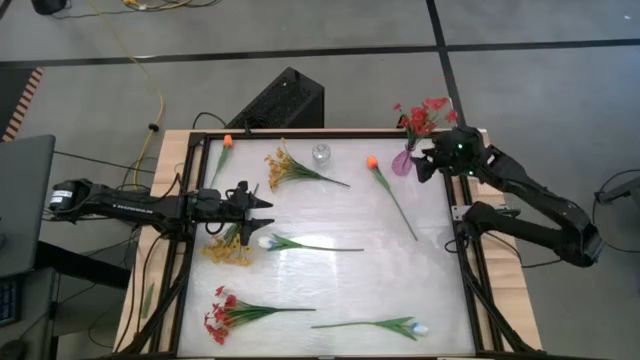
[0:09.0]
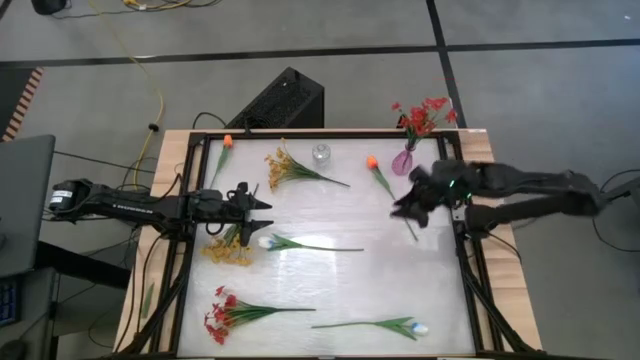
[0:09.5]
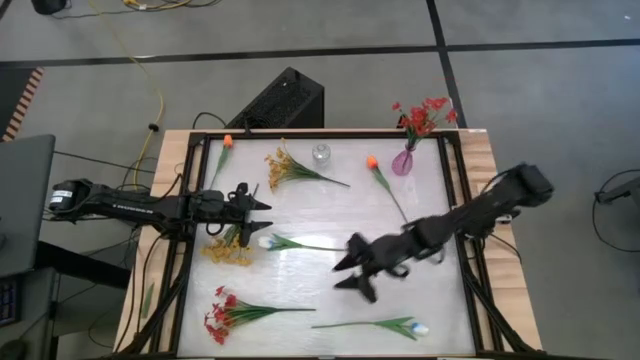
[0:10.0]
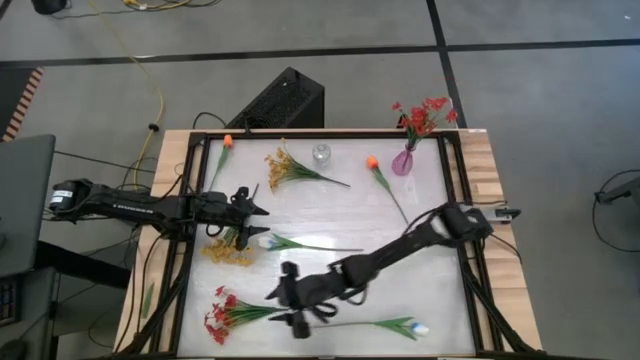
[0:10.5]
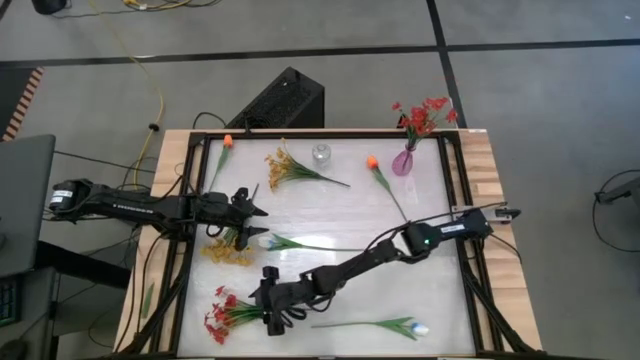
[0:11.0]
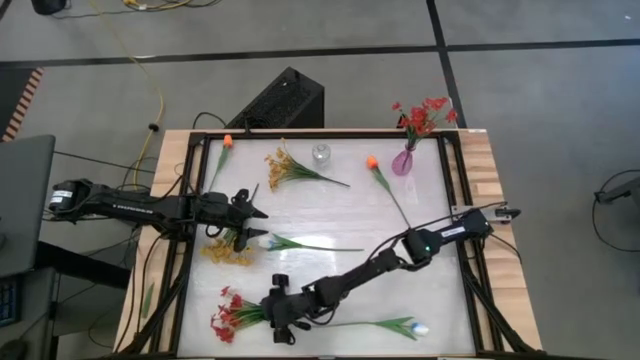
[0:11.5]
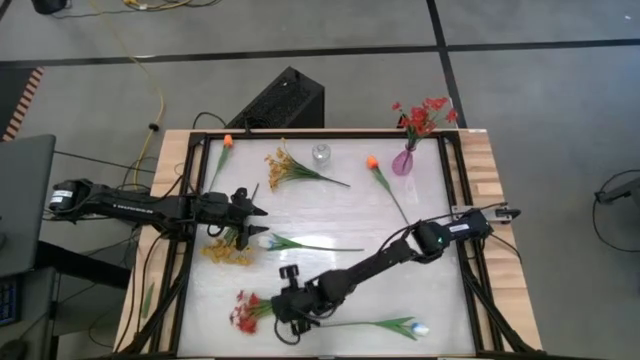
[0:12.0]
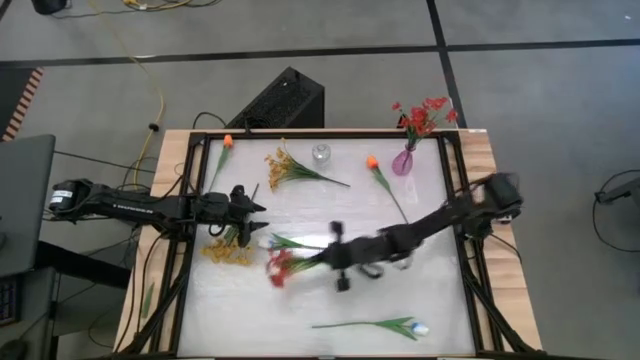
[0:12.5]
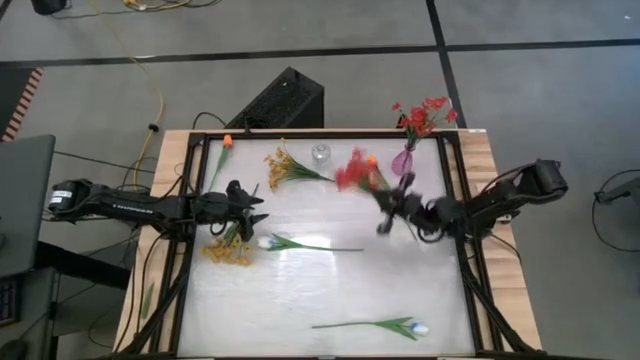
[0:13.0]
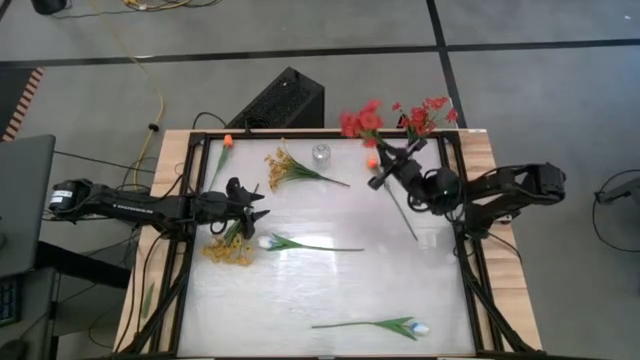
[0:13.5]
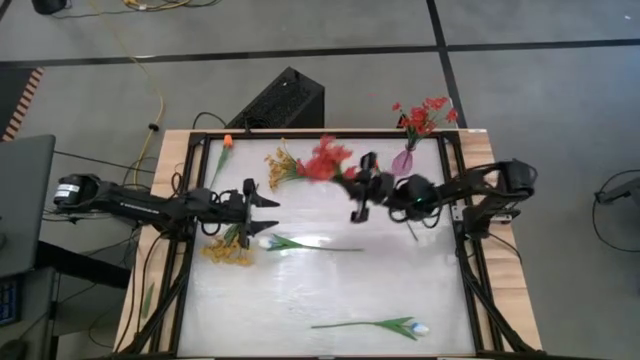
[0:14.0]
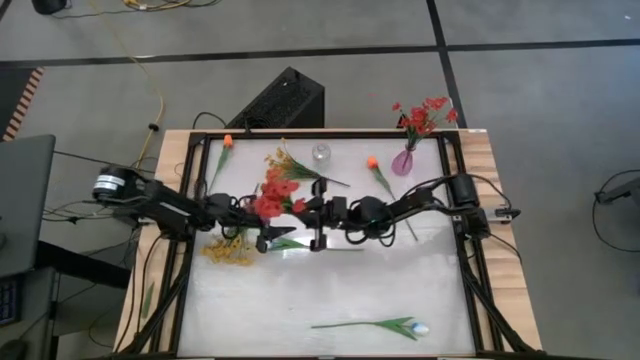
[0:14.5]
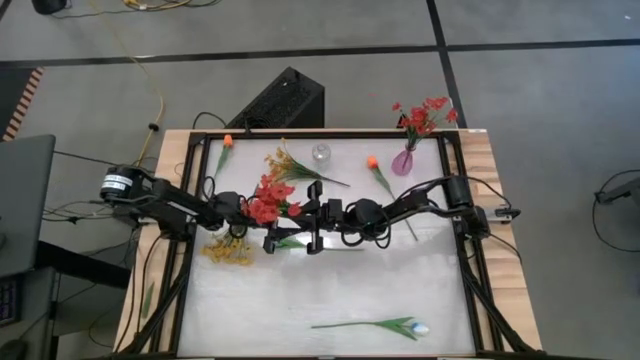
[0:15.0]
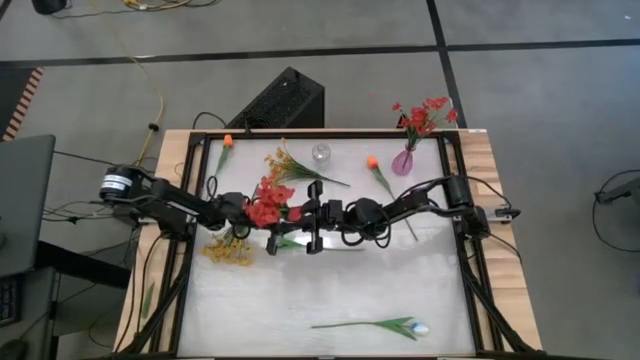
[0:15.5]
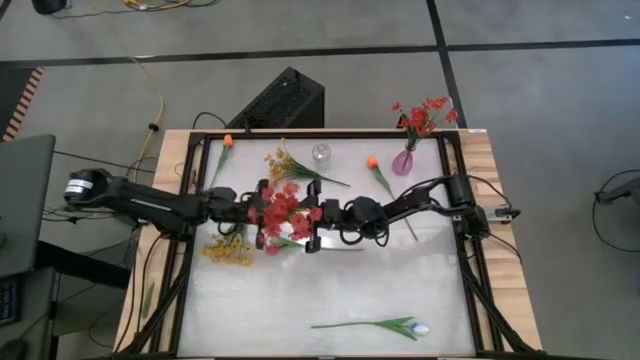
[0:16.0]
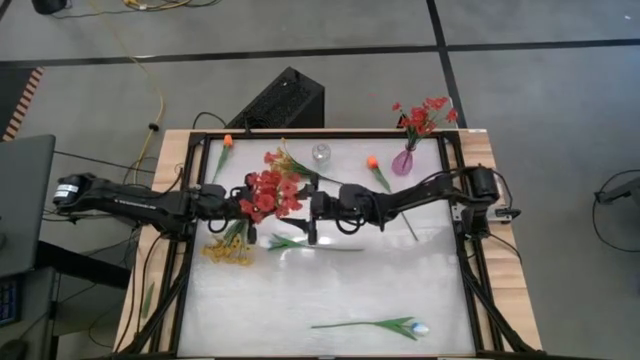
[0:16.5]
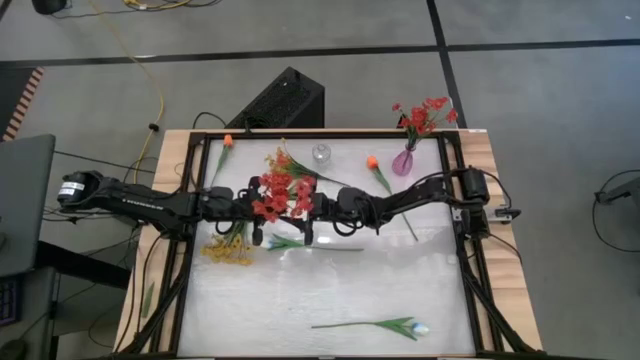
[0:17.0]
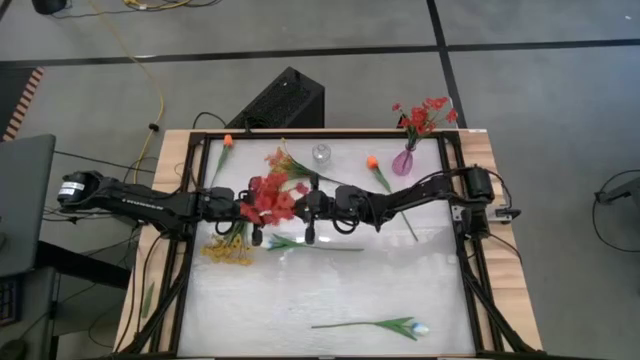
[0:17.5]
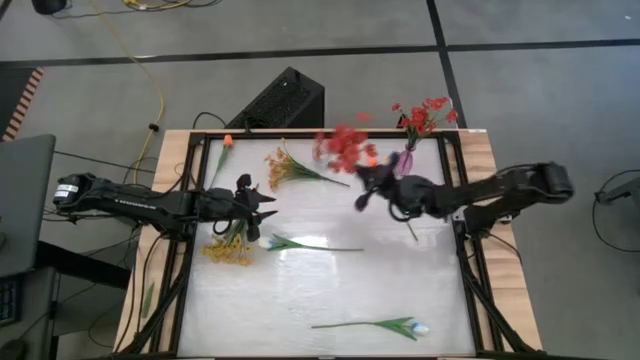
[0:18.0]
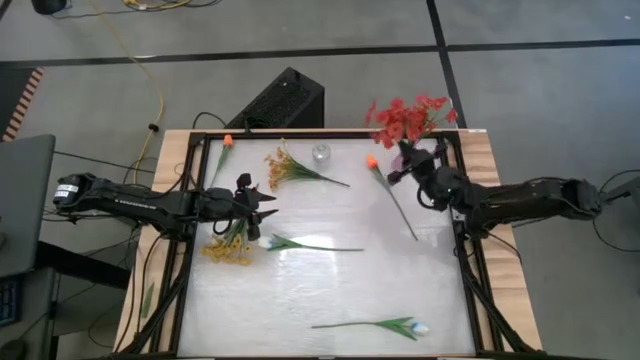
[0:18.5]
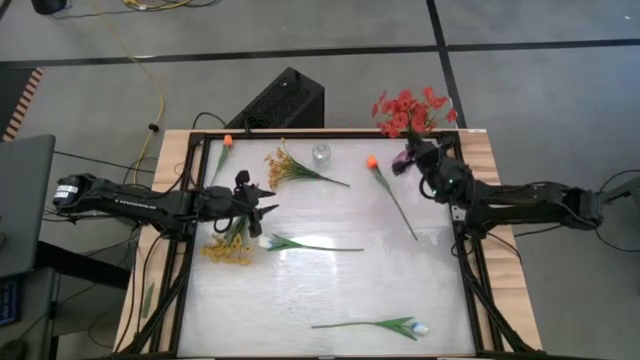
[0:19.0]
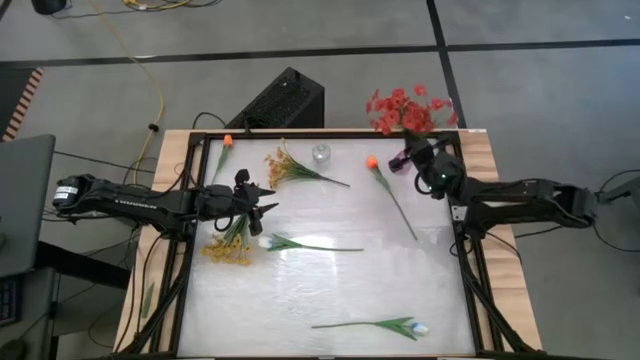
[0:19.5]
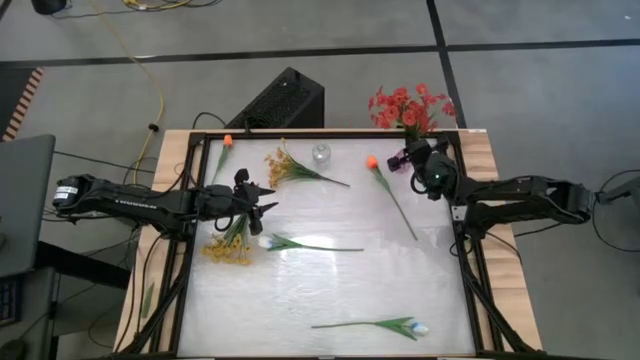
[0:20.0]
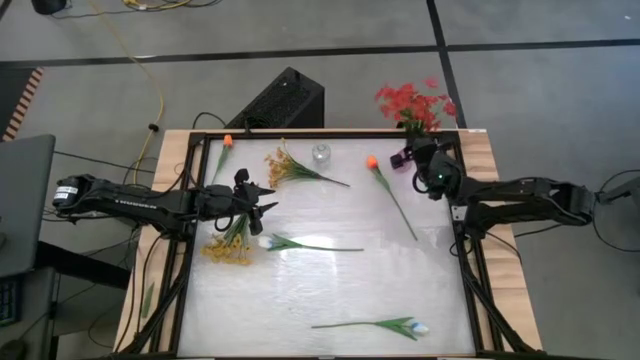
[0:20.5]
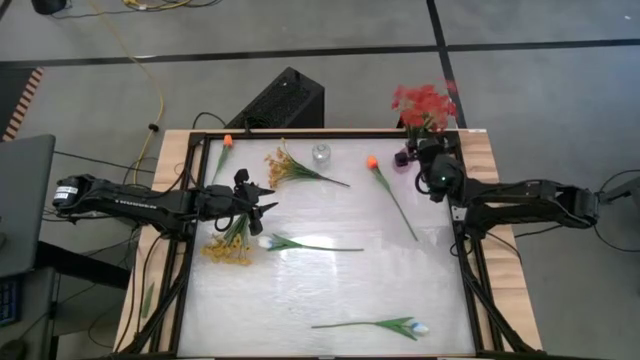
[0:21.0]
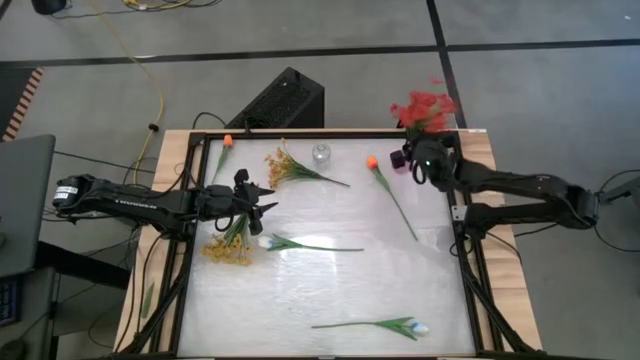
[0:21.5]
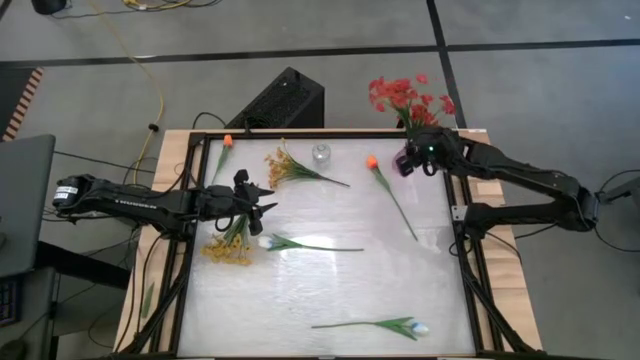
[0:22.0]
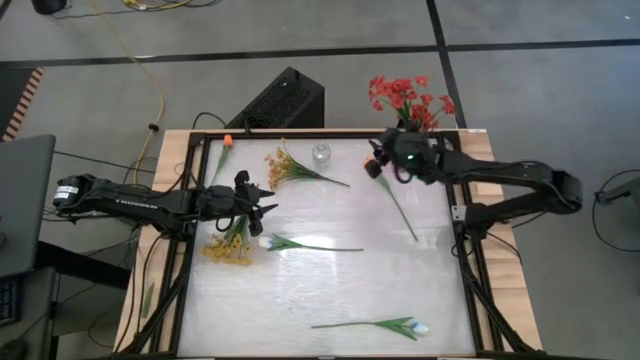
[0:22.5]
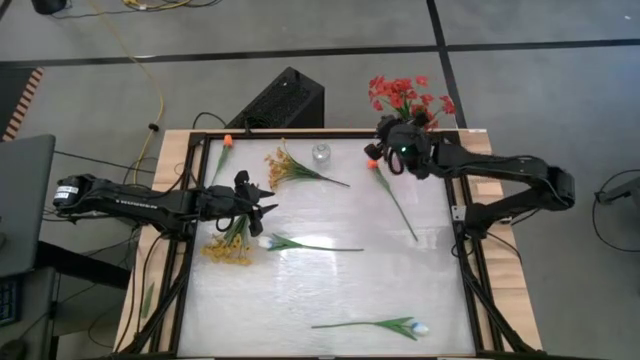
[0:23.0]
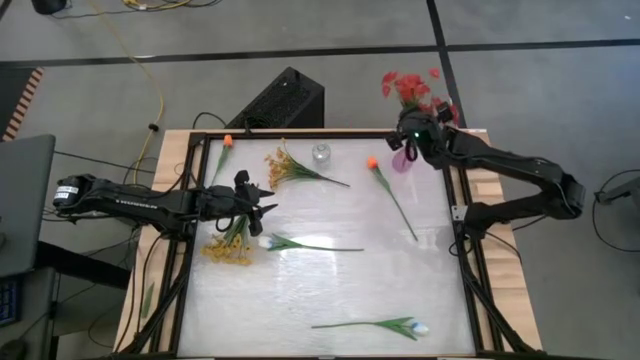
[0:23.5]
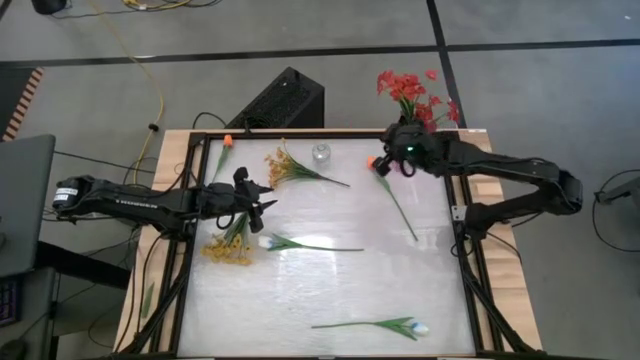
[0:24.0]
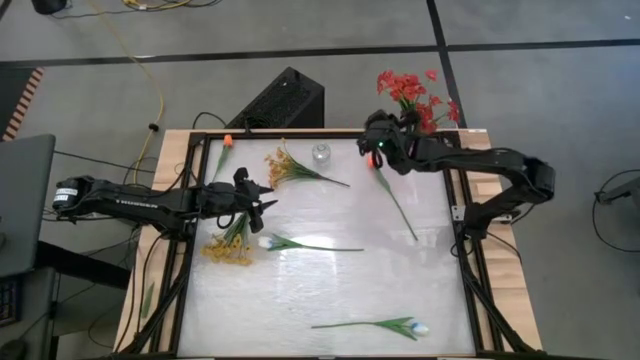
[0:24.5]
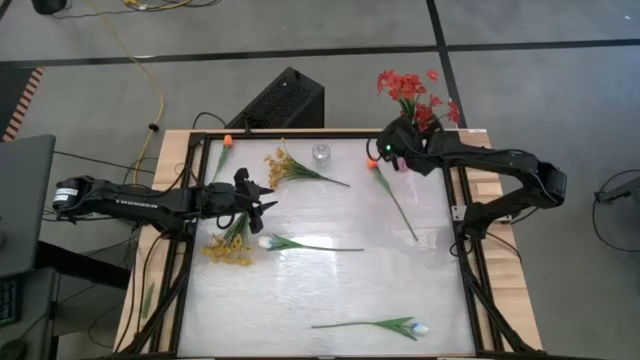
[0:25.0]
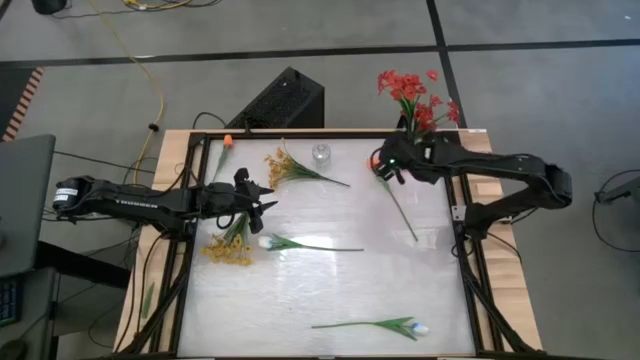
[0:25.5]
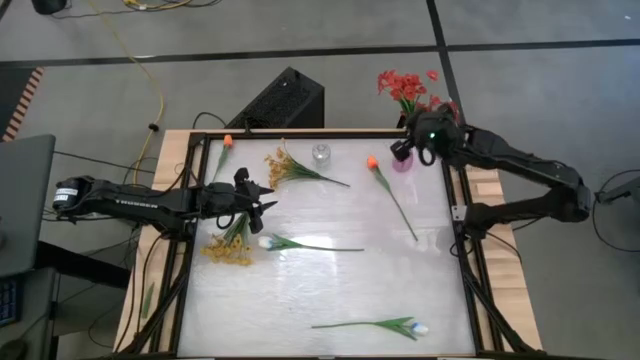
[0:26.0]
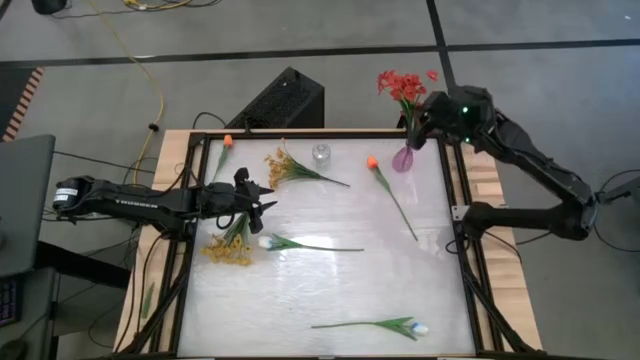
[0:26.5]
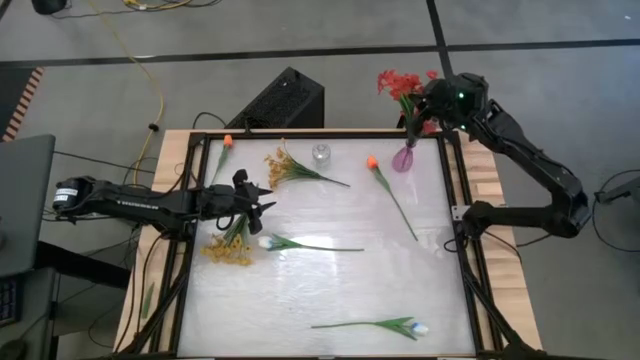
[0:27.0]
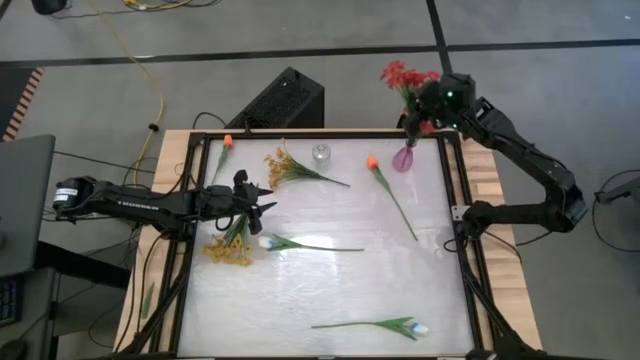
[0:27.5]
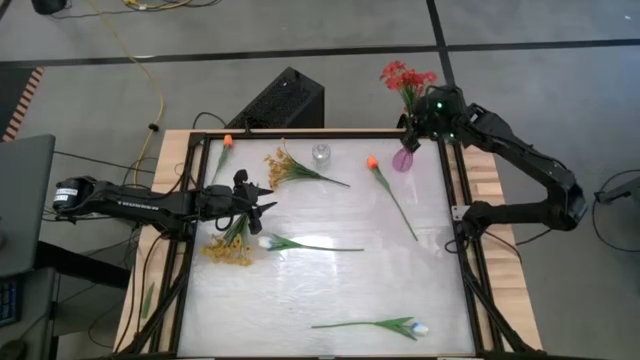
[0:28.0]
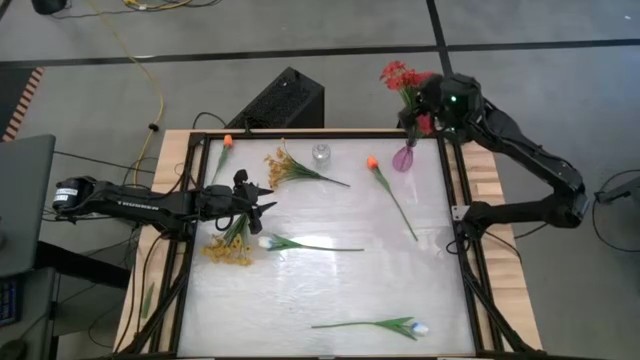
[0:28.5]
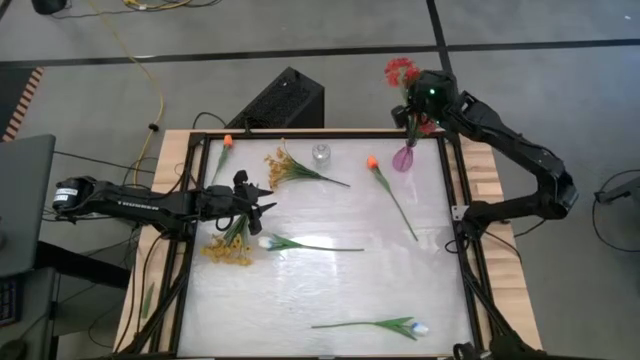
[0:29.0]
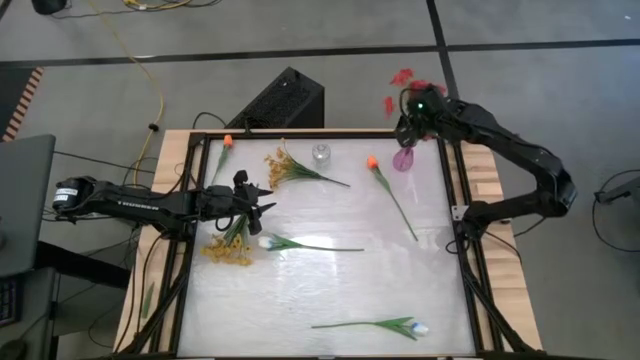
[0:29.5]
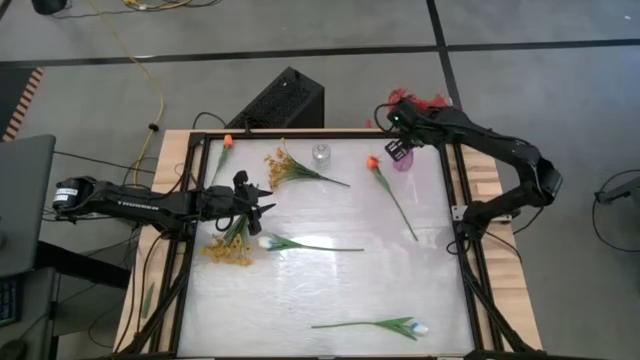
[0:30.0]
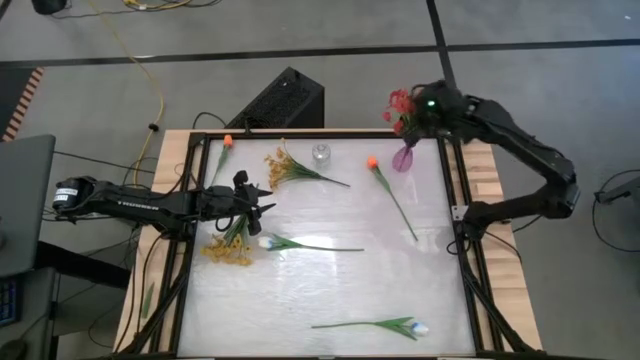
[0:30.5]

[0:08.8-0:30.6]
Task: Sort flowers into vase by color
Put the red flowers into the purple vase
